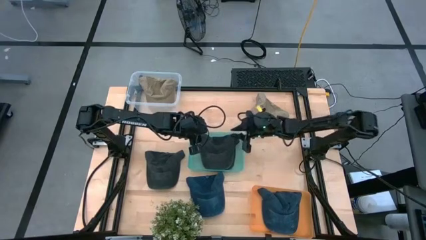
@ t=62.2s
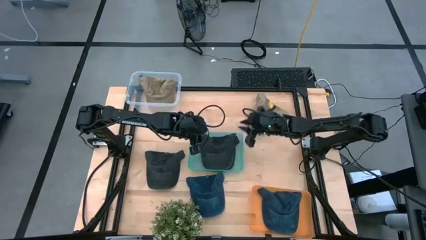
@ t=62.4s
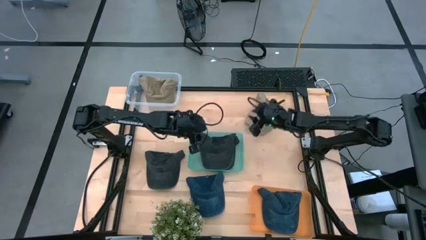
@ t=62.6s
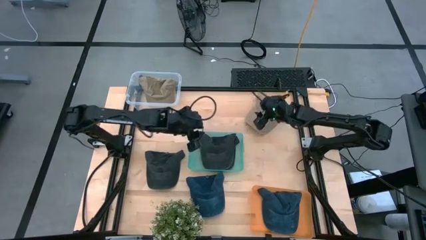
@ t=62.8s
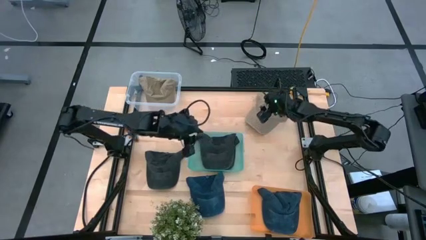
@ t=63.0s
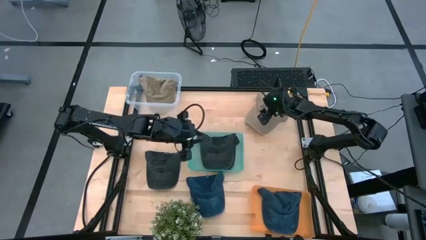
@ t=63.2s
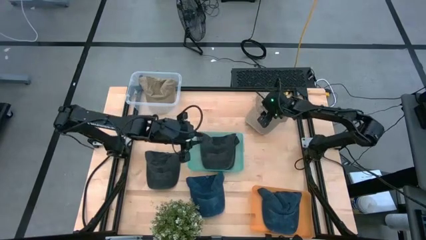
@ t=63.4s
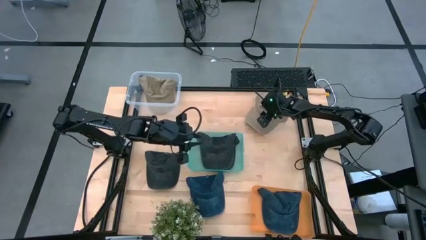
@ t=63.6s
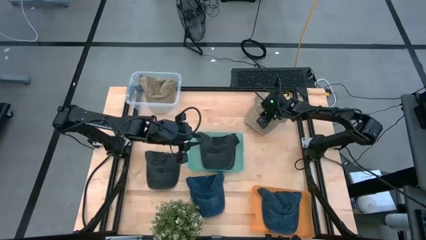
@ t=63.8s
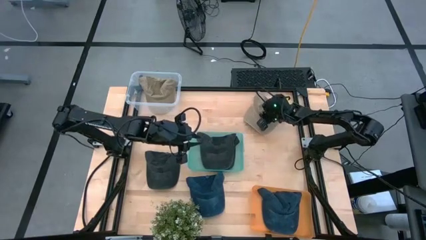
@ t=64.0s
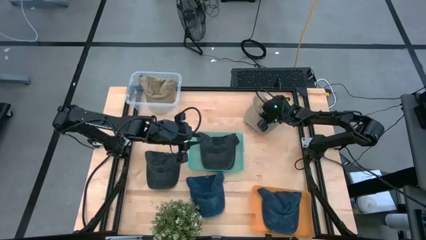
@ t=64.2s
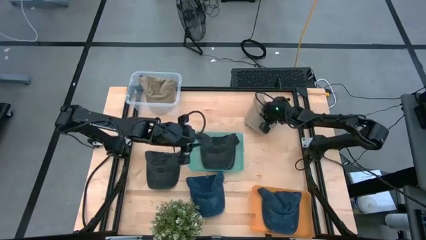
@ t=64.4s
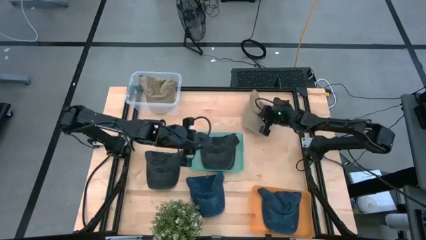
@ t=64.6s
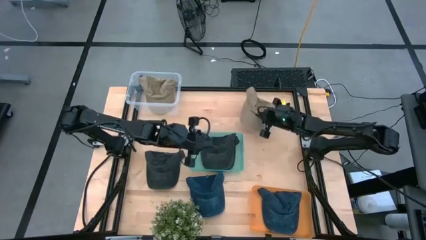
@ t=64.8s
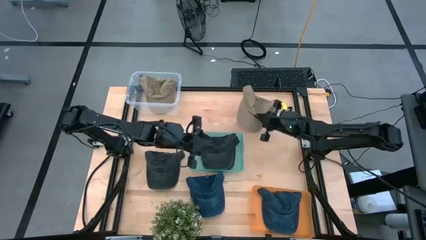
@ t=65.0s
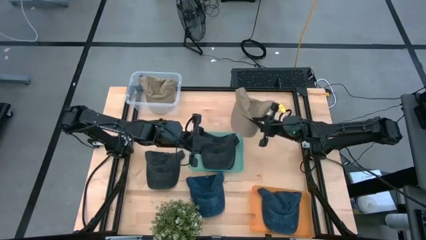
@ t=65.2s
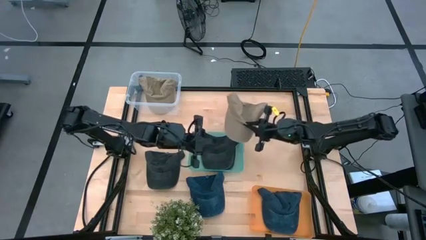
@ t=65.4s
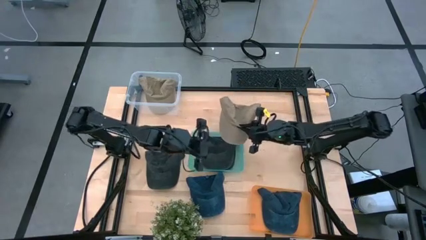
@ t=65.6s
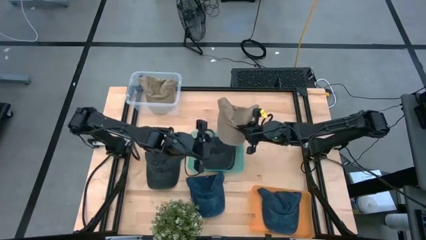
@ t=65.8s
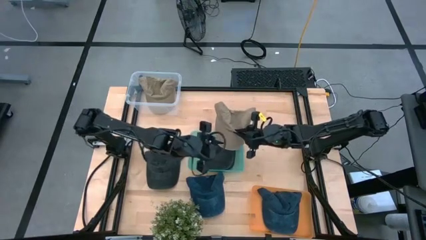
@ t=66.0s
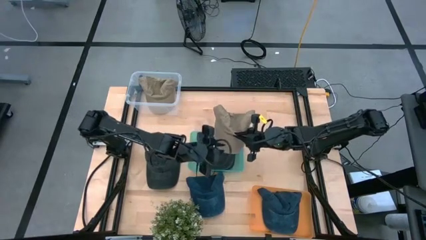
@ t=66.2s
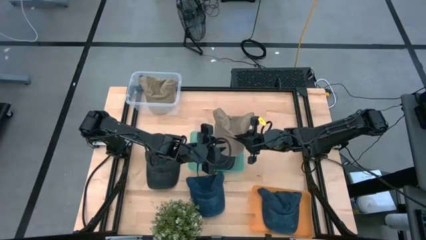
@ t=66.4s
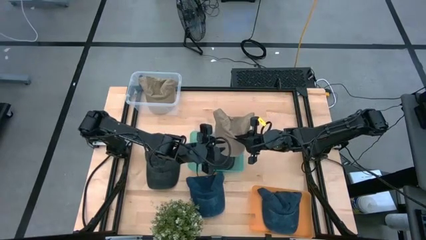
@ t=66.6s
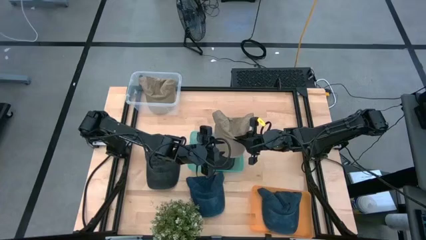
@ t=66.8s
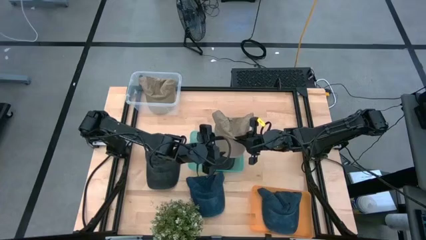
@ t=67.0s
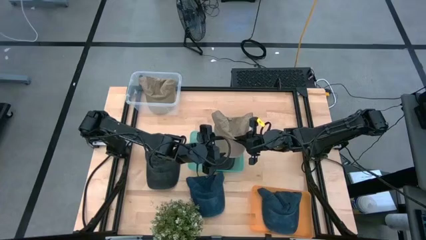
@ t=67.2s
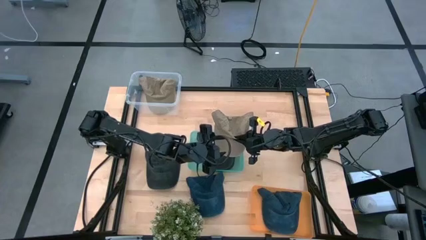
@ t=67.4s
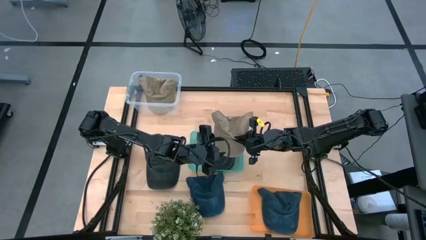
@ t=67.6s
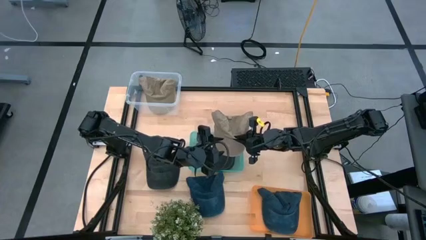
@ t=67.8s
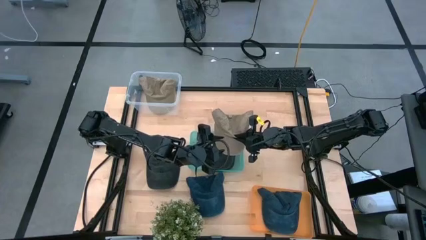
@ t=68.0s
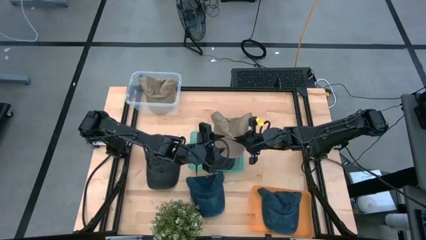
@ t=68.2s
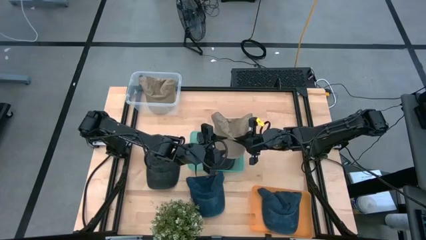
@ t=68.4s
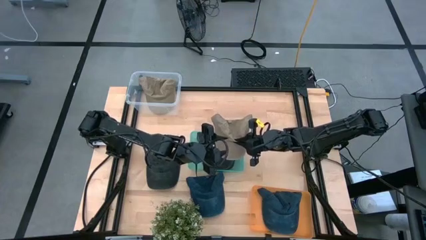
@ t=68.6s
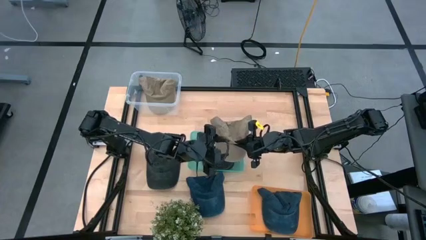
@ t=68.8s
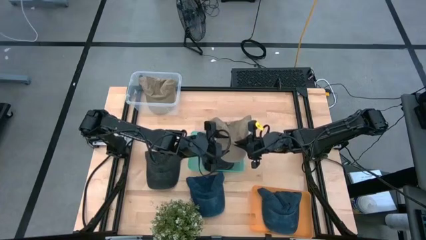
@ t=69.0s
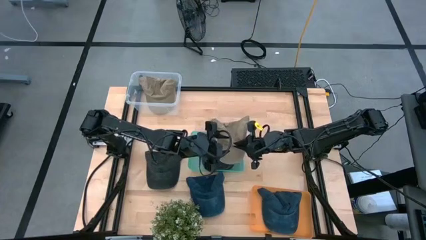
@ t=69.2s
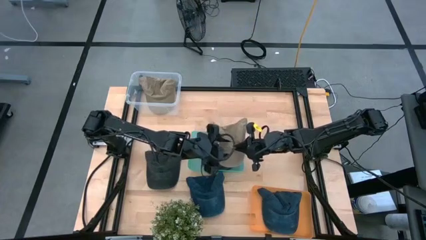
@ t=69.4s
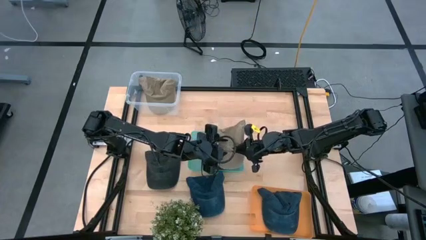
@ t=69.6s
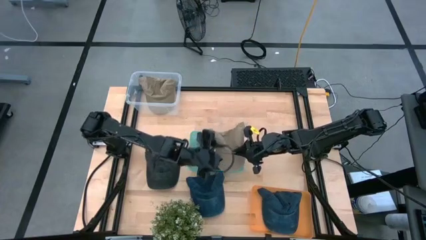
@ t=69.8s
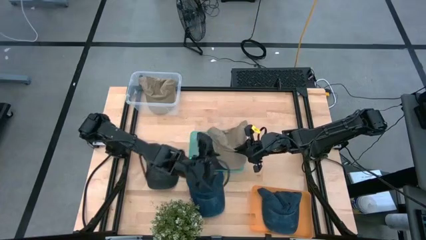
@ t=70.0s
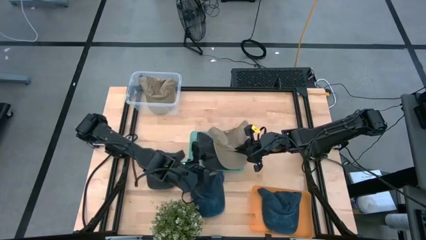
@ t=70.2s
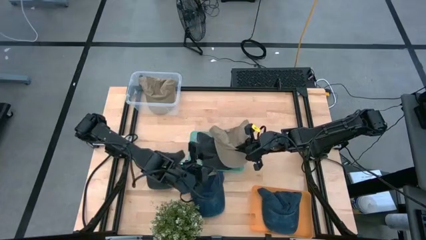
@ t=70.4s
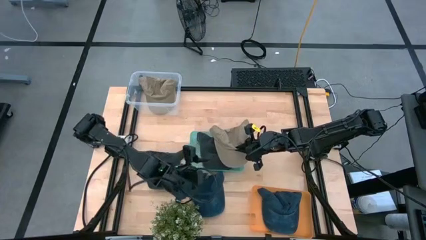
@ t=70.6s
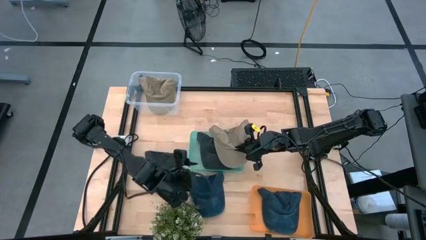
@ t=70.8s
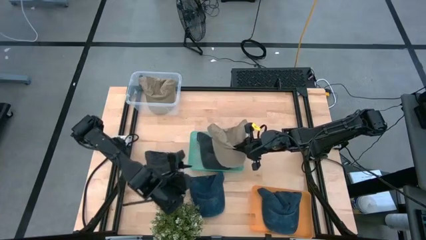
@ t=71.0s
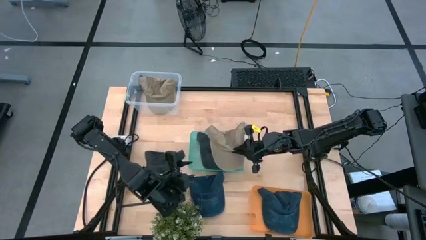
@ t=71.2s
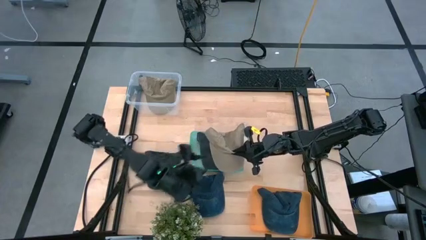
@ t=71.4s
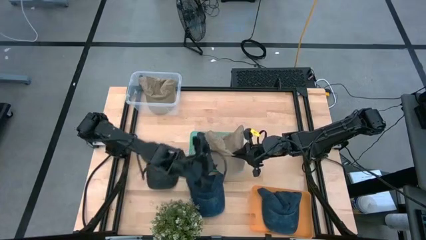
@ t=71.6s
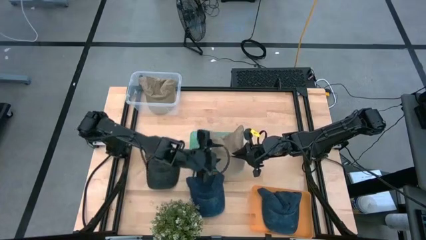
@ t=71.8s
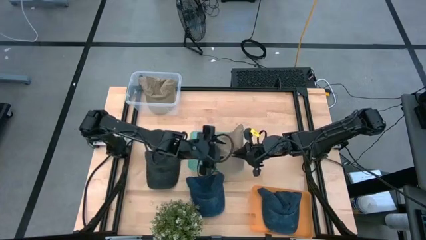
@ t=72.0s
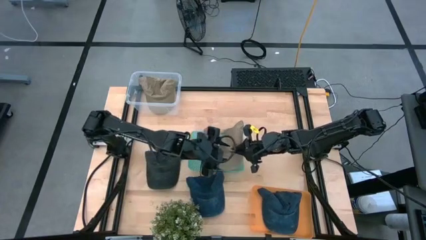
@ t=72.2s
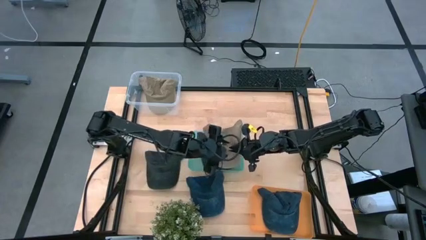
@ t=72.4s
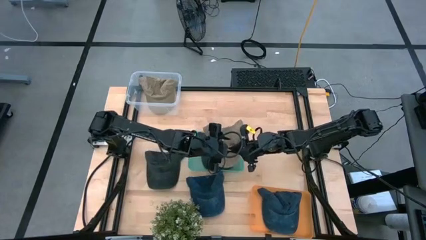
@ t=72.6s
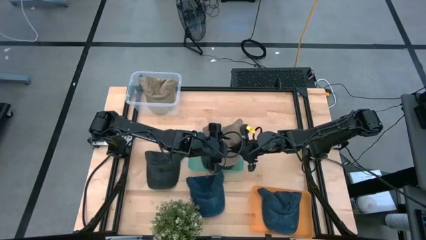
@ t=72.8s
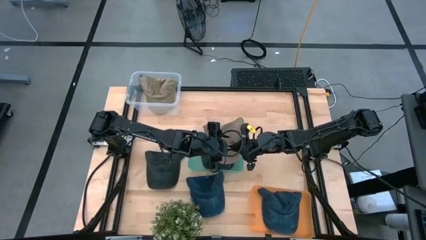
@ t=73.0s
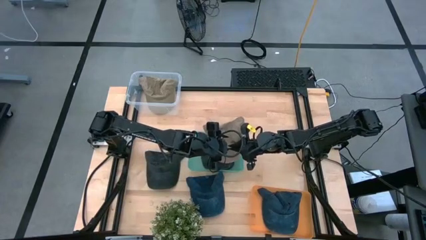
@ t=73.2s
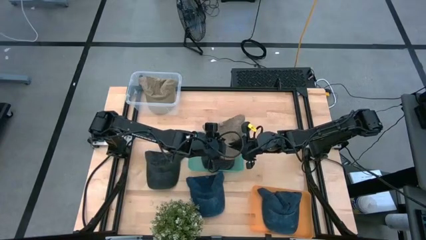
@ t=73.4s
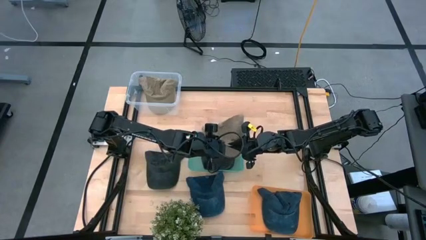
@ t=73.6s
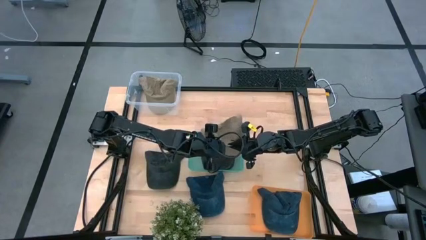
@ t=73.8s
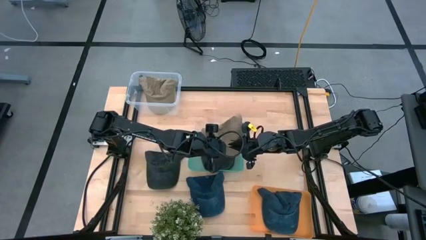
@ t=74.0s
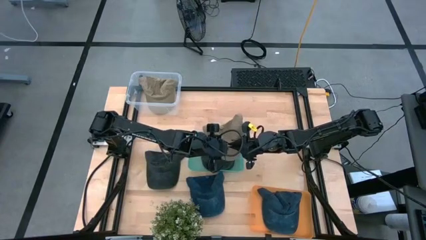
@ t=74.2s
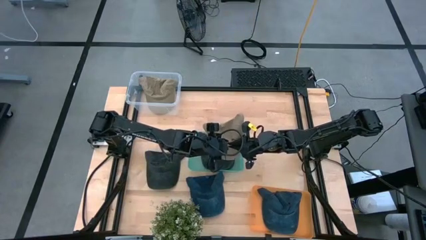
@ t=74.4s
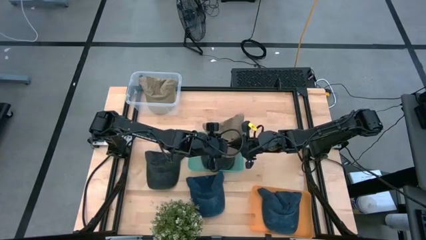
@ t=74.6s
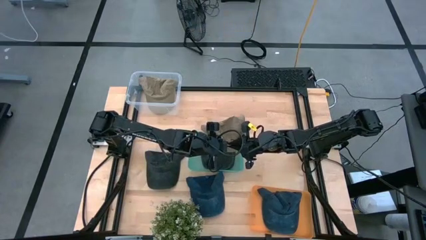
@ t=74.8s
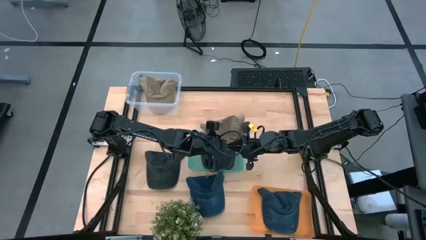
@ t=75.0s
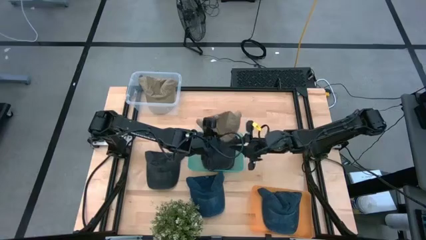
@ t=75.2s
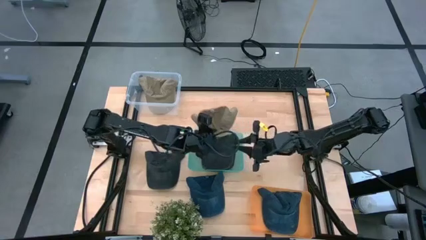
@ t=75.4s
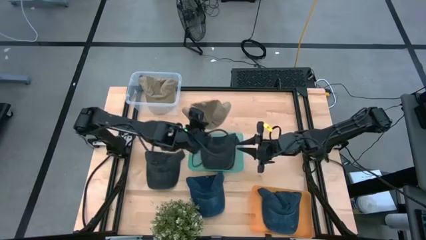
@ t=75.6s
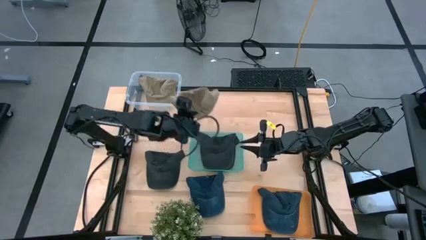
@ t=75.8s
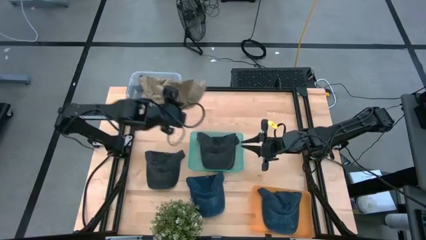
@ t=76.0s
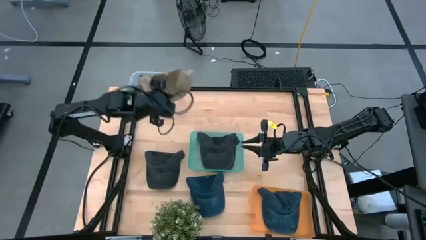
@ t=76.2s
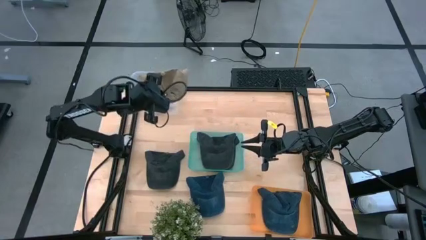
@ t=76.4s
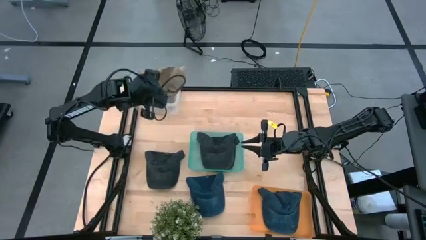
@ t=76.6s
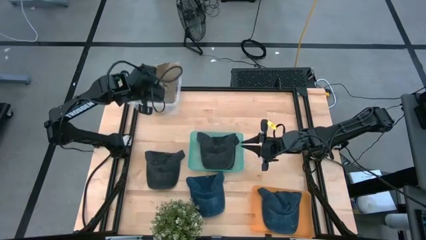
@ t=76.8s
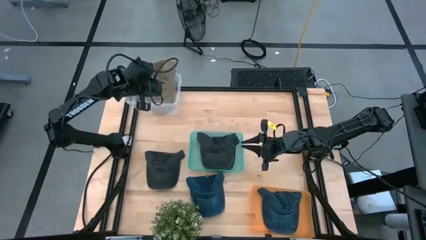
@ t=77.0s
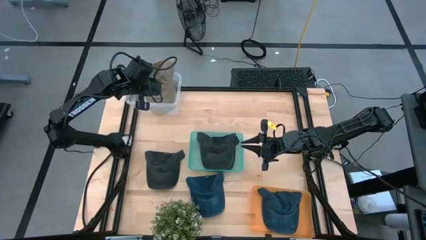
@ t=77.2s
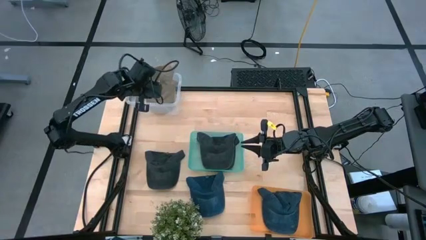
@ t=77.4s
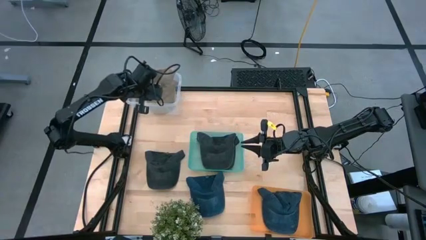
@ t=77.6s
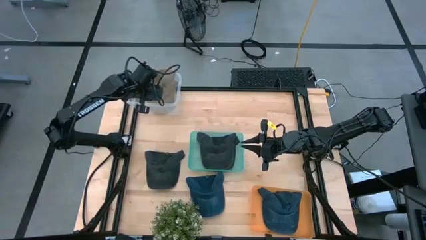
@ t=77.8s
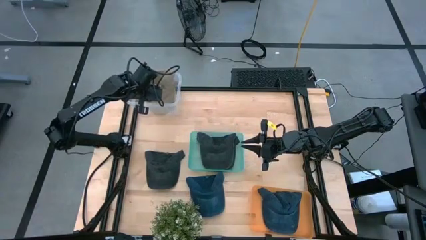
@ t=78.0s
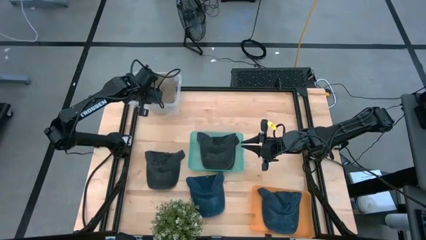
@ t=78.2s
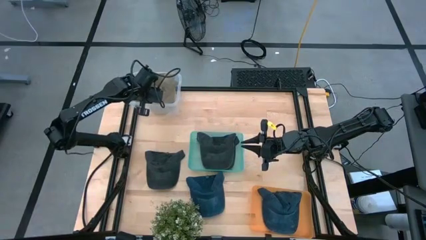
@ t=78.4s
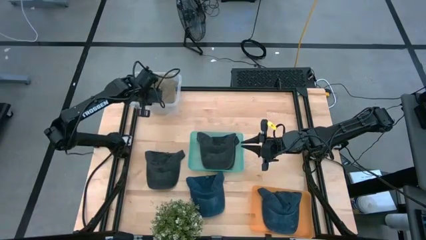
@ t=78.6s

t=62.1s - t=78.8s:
Task: Pick & Place hat
Put the brown cap into the transparent bin
